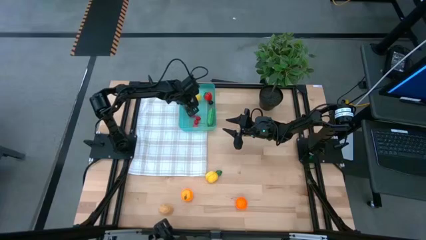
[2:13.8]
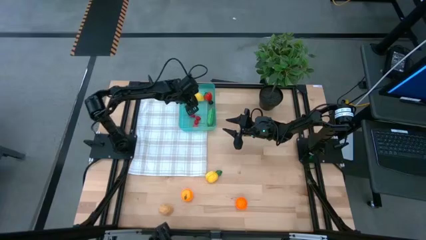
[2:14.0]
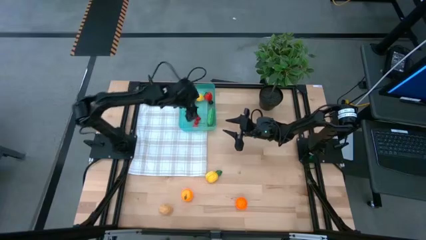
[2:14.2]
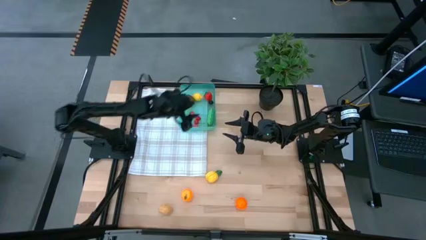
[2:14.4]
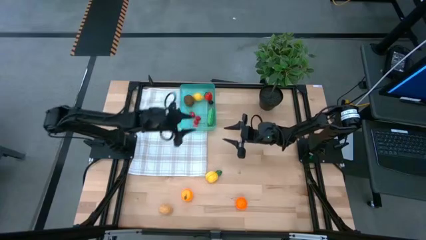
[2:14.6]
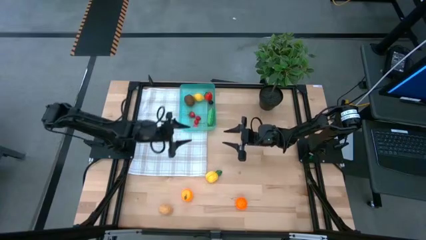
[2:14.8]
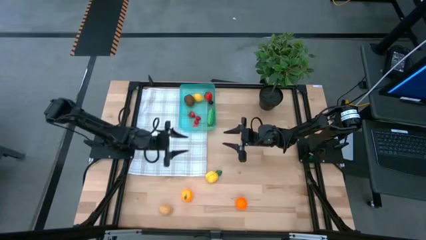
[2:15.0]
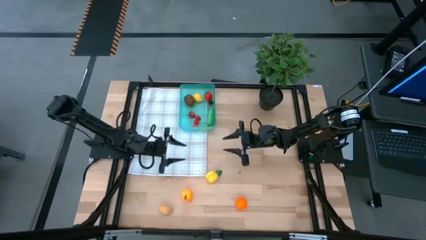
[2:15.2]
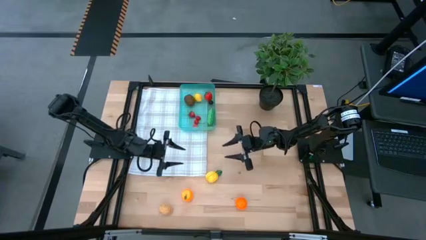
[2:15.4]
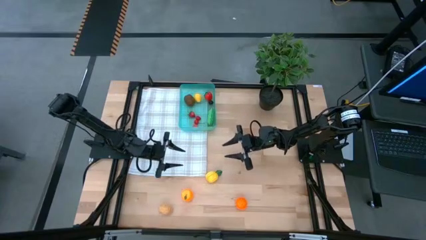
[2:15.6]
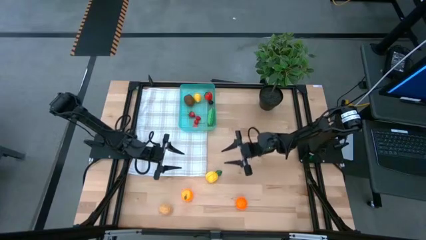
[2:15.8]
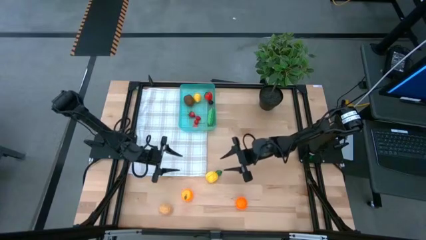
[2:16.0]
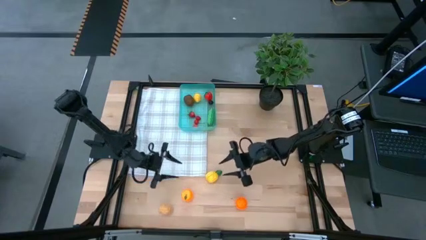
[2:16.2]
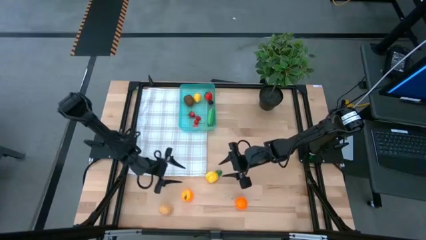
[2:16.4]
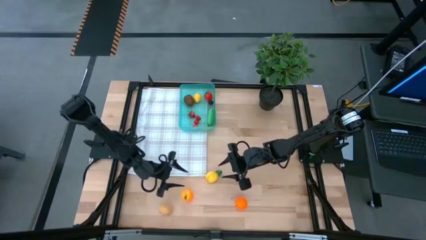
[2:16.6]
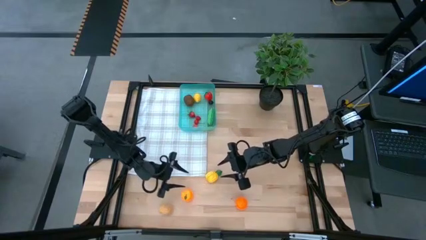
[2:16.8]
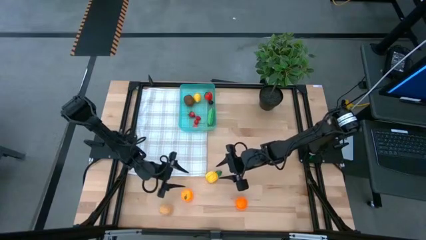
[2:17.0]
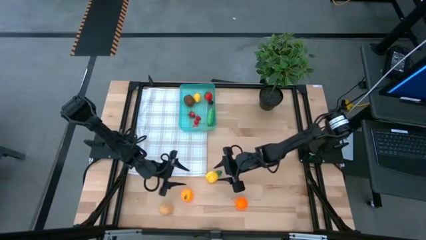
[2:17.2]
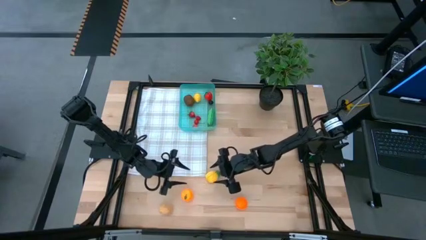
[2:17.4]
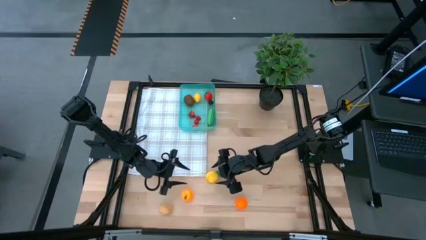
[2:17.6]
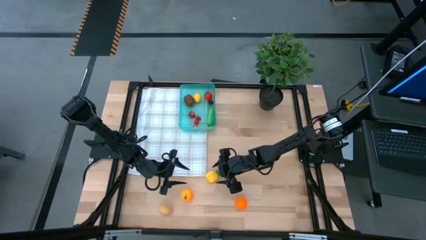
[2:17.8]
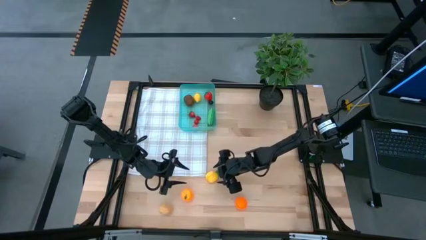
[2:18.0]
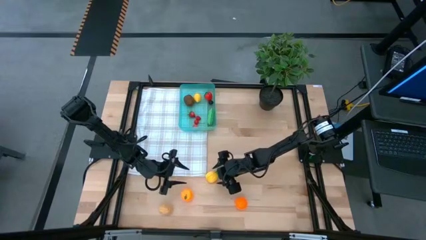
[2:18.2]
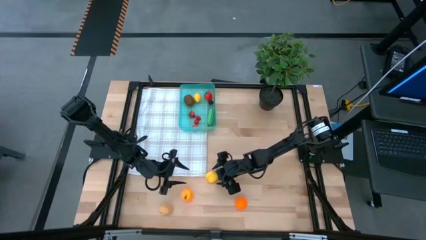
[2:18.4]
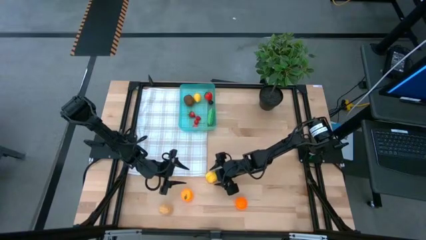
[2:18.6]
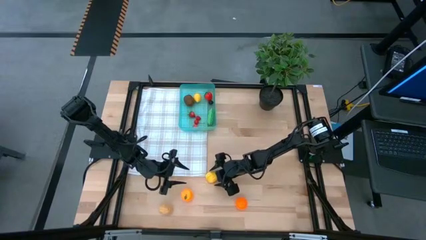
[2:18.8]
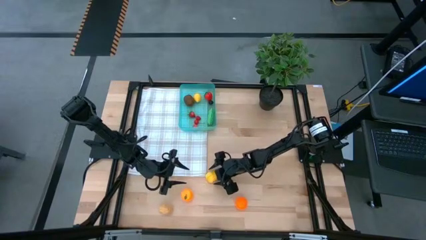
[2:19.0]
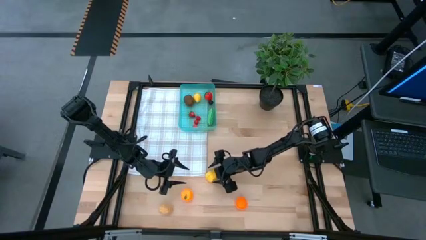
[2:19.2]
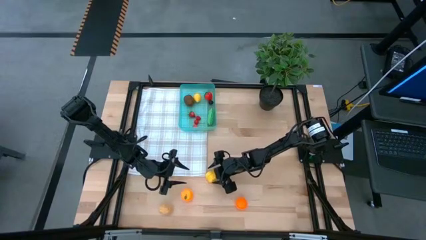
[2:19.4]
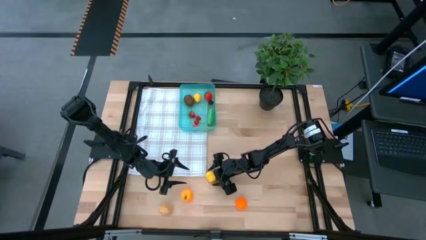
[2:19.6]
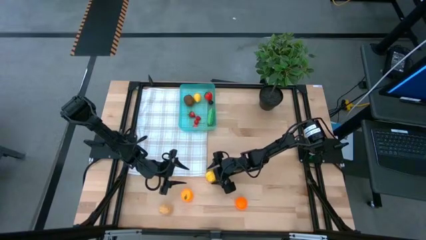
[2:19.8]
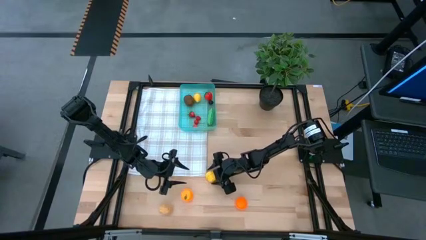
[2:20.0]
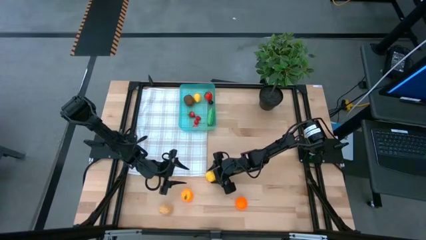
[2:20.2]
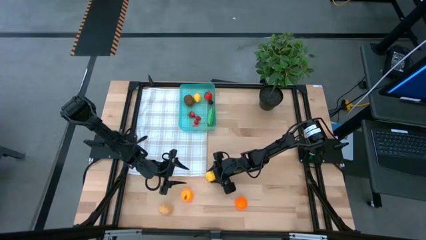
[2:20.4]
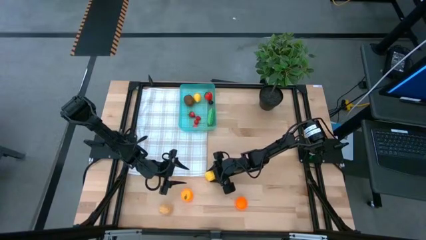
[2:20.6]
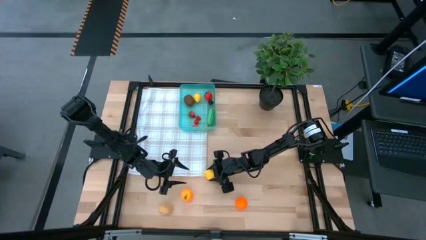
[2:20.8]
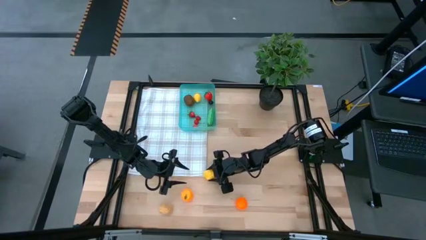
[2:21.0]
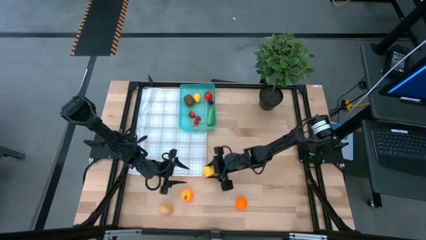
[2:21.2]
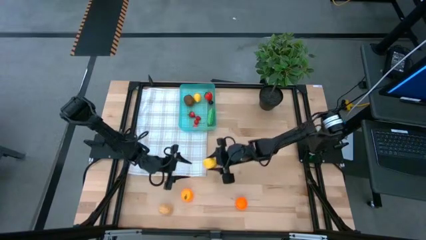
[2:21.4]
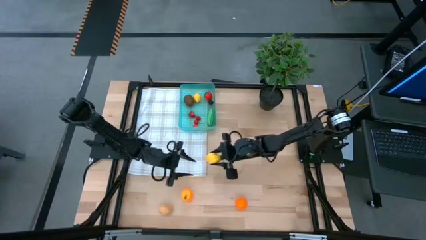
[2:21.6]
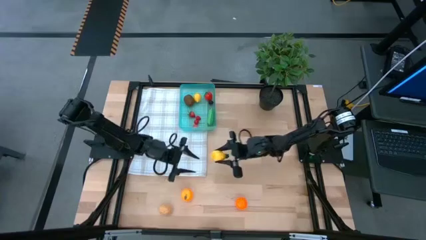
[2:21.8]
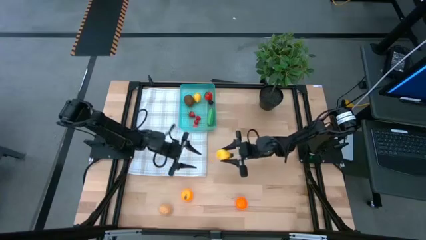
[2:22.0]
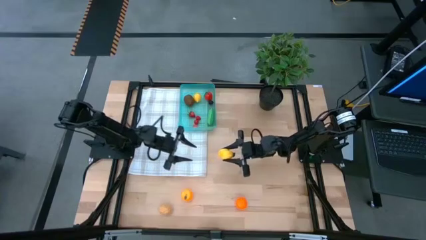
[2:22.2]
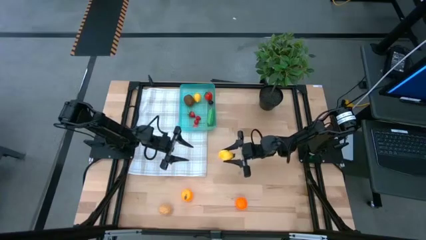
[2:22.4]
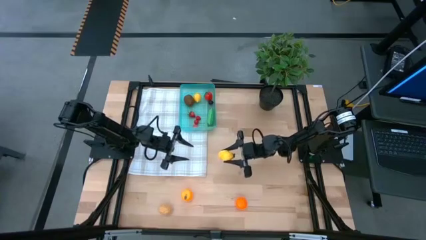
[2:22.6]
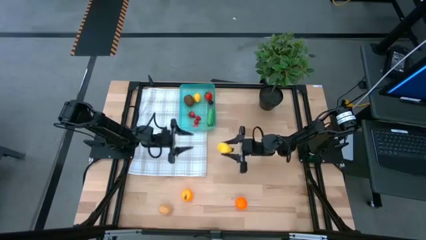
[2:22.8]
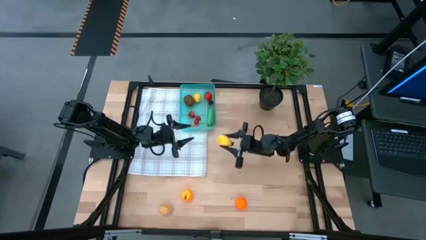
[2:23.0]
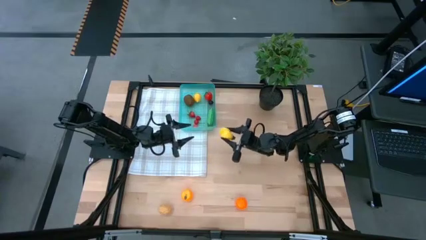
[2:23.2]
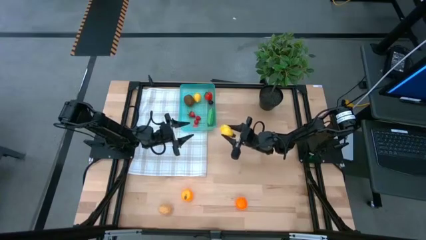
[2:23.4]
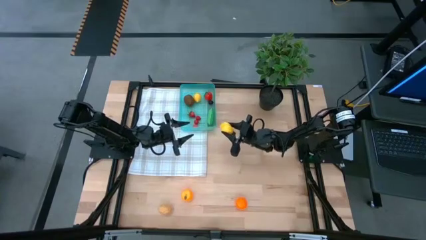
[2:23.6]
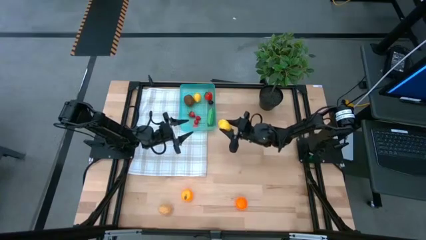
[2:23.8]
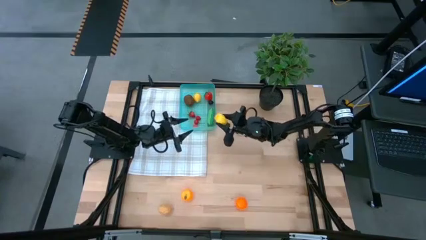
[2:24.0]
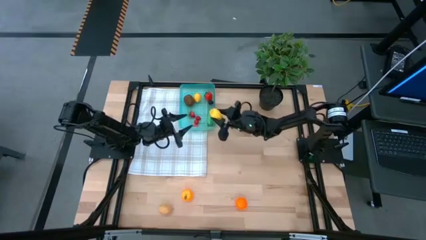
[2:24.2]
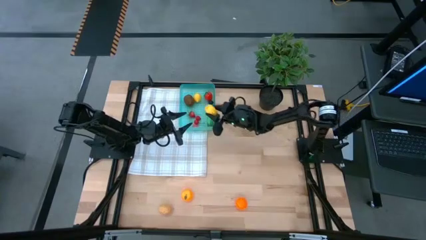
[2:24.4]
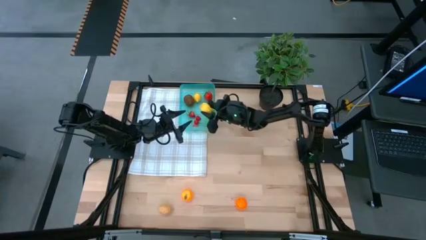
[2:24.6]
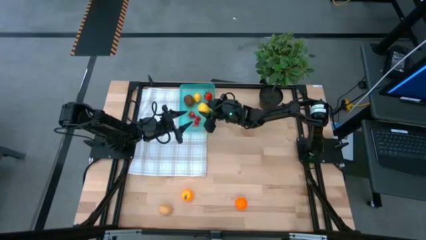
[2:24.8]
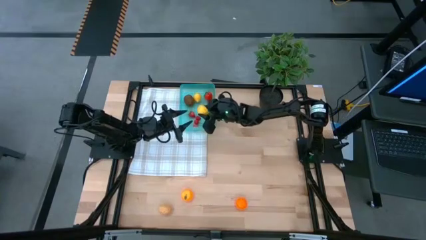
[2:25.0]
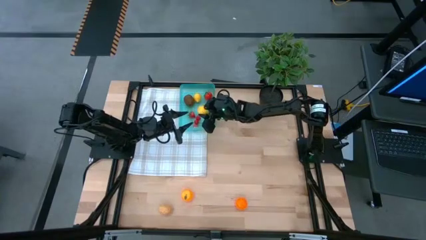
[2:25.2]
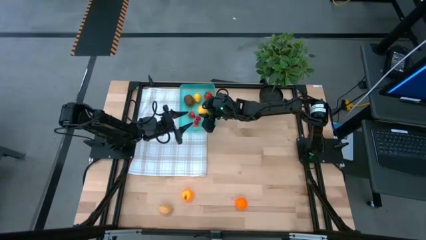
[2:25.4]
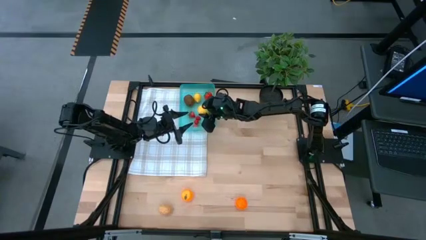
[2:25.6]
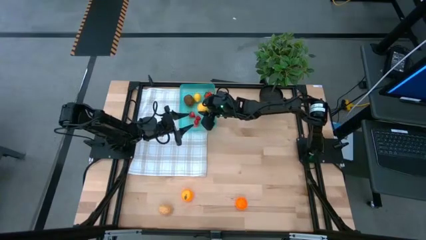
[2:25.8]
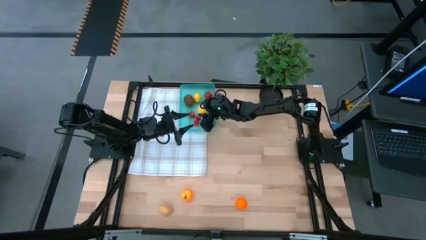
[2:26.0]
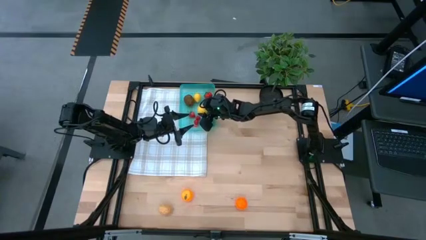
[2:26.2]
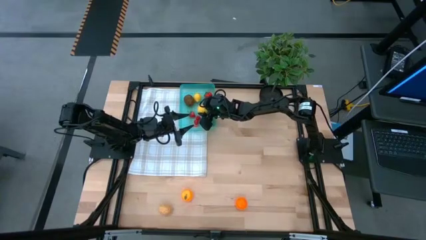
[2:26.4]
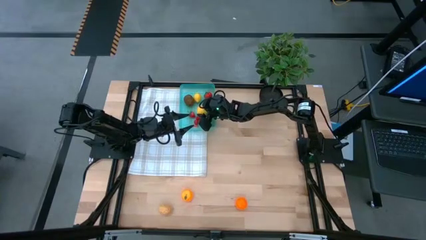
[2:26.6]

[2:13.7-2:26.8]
Task: Pick and placing Produce into tupperware
Put the yellow pineapple into the blue bin

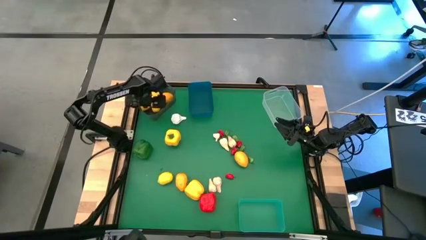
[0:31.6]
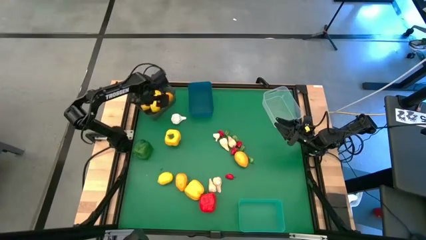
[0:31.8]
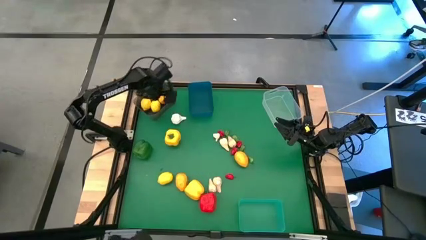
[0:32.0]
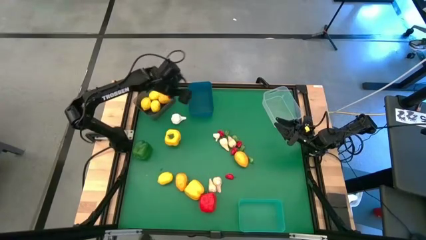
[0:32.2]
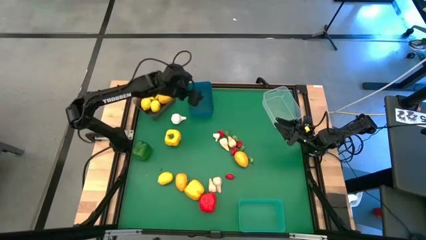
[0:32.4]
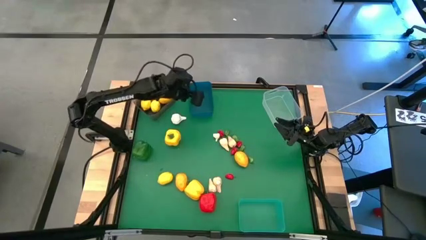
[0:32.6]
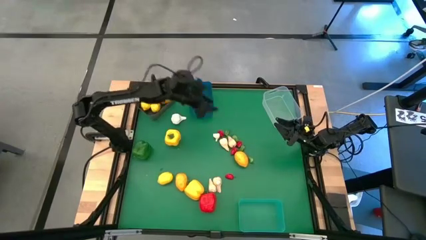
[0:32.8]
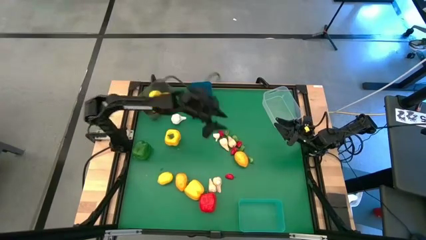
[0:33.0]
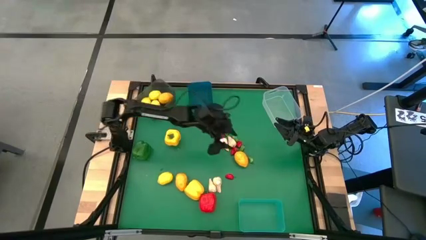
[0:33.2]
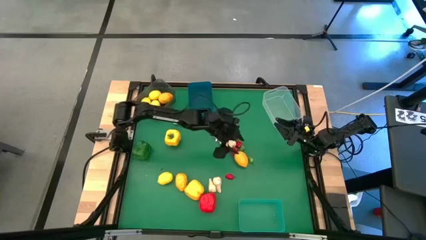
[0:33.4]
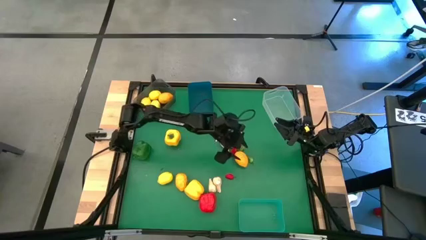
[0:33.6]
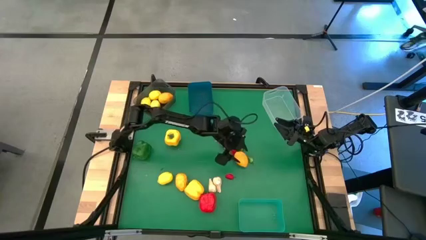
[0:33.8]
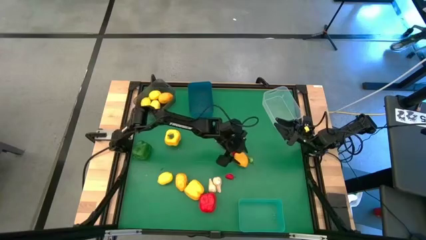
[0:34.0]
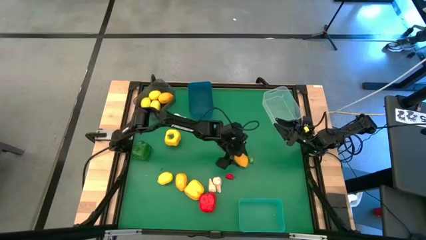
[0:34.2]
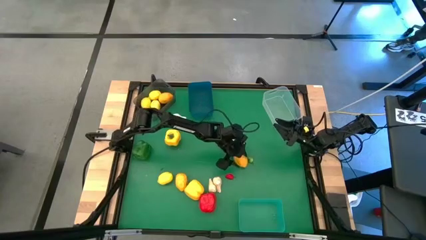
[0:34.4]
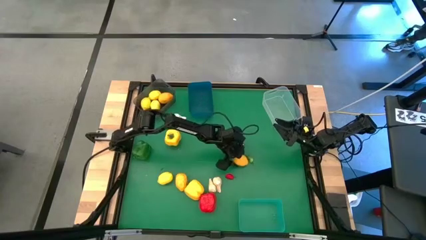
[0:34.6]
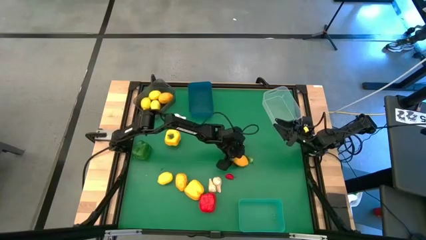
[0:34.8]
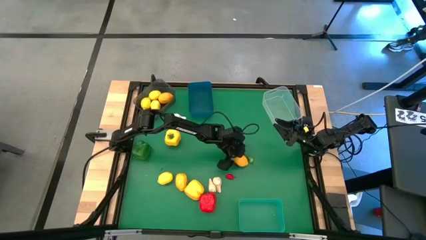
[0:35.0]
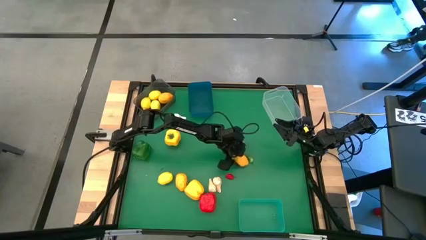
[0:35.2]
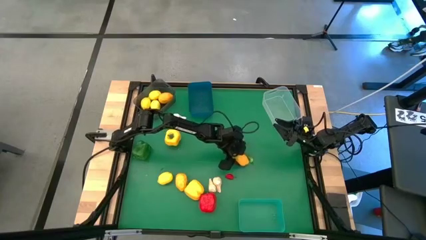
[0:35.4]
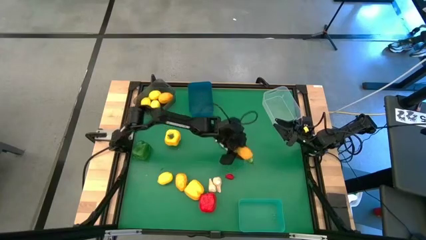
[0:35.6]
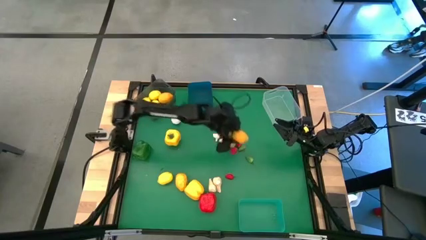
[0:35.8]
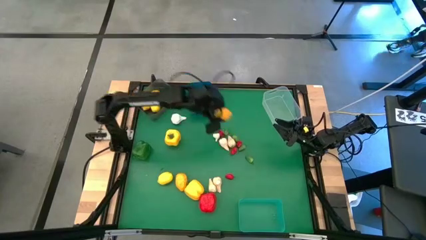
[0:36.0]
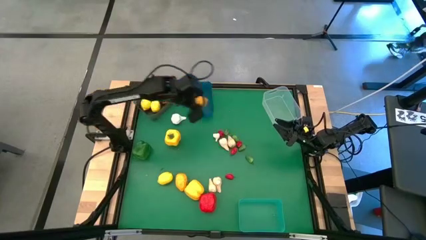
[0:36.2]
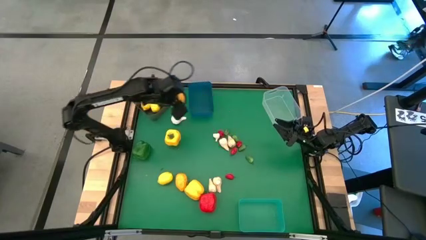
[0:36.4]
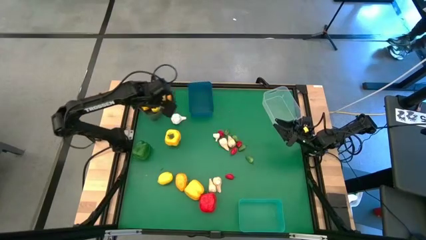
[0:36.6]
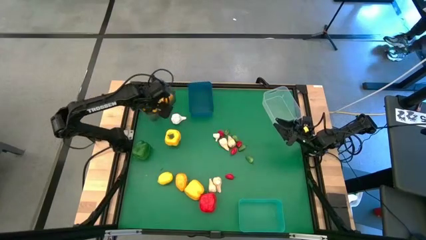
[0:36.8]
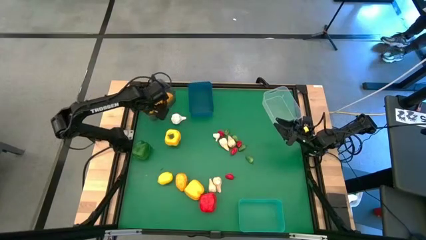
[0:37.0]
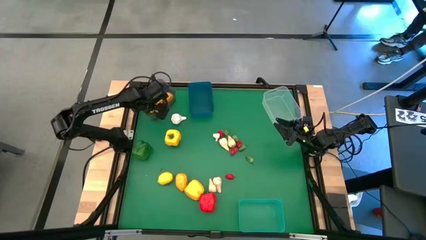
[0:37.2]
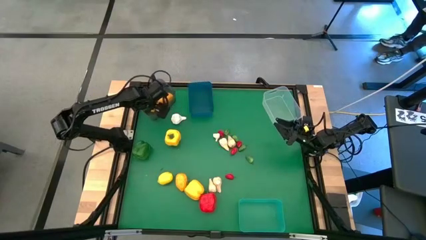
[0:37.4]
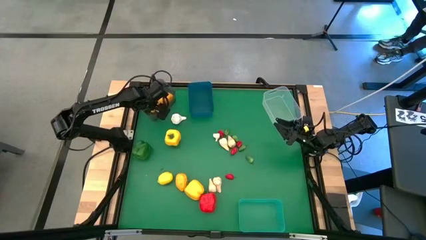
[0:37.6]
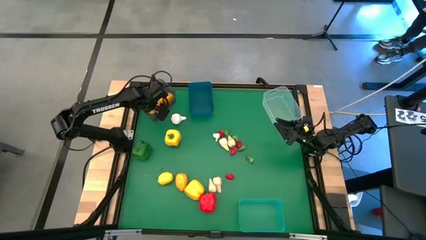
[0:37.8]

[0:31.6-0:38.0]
Task: Sort produce into baskets
Put the right orange lemon into the black bin
